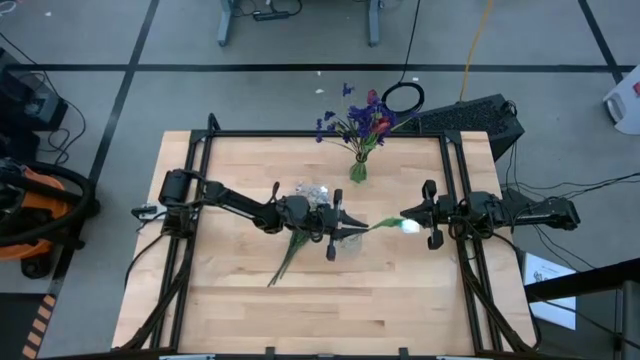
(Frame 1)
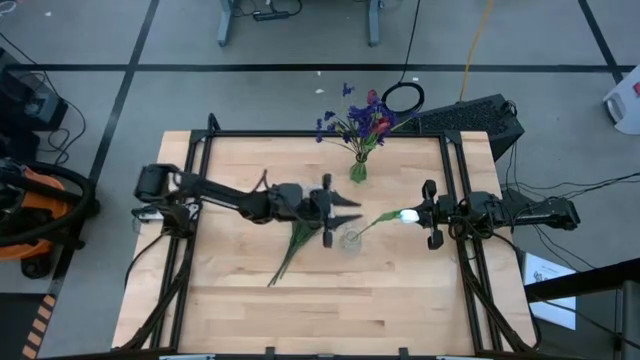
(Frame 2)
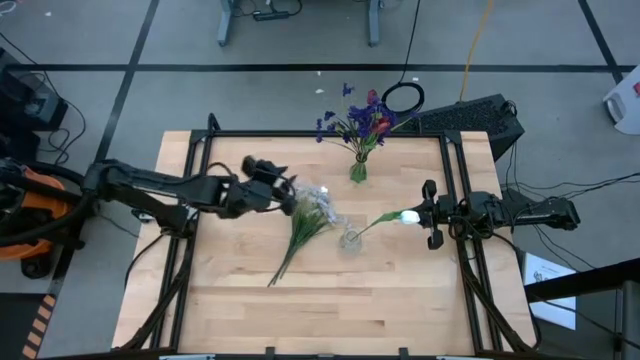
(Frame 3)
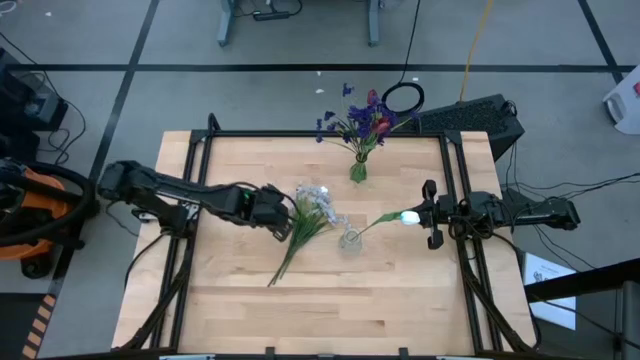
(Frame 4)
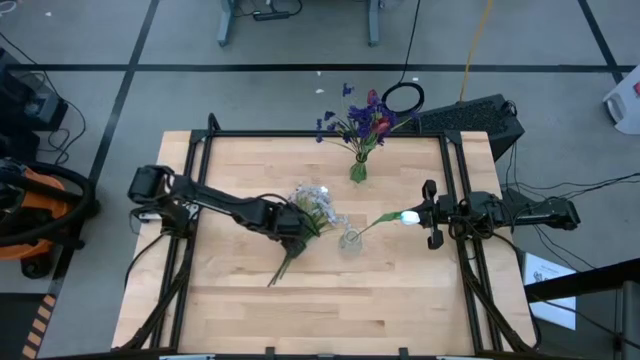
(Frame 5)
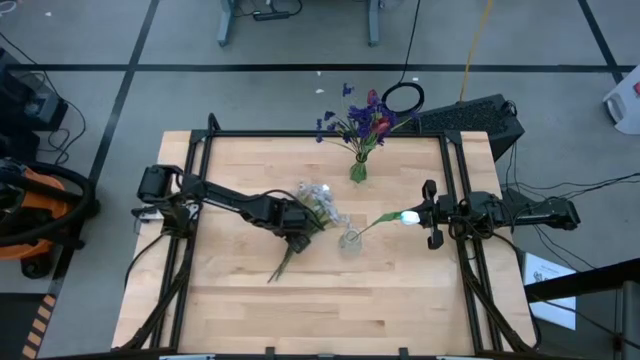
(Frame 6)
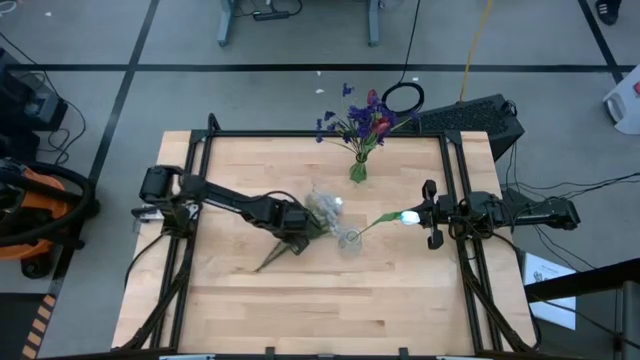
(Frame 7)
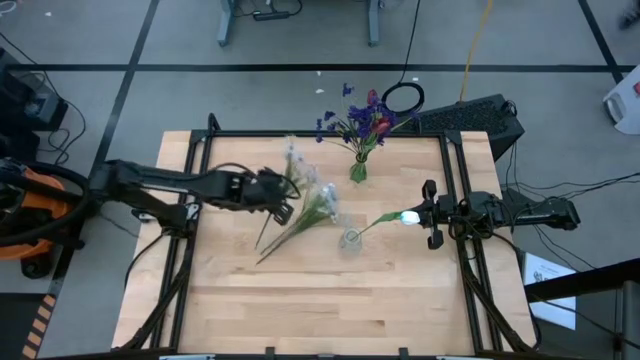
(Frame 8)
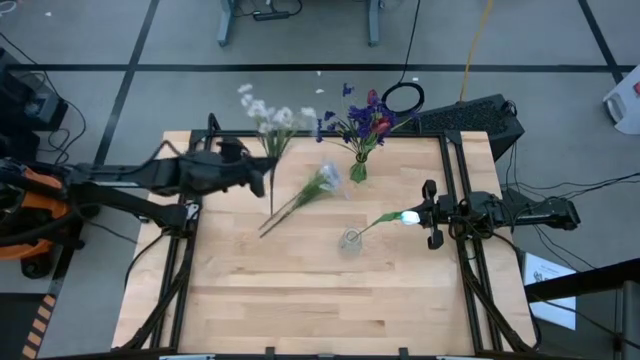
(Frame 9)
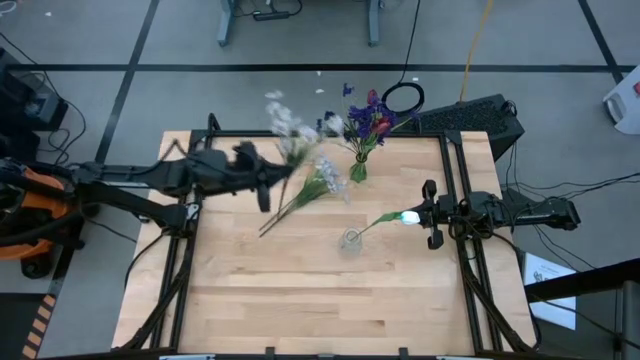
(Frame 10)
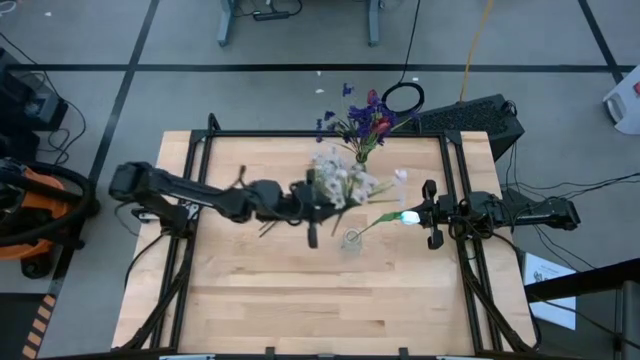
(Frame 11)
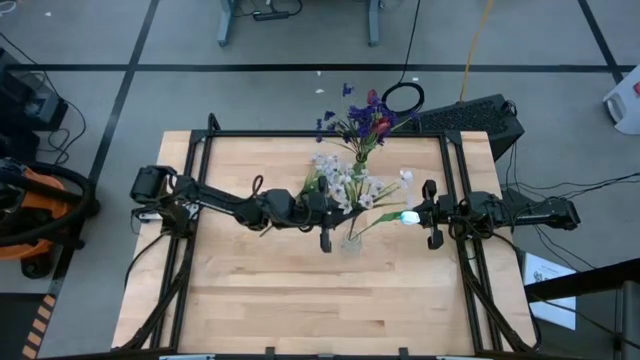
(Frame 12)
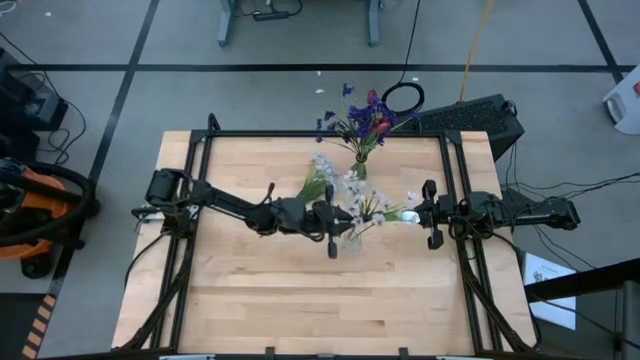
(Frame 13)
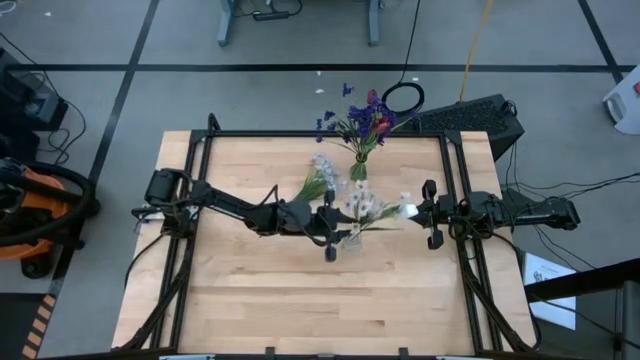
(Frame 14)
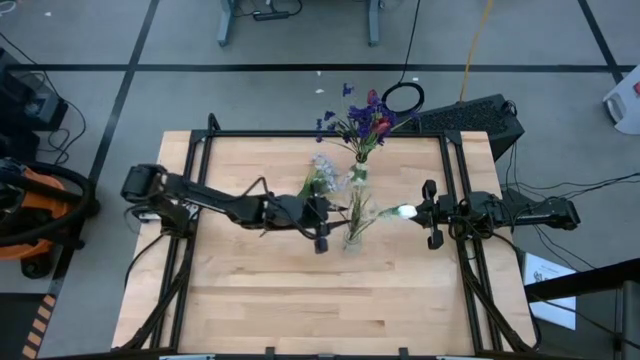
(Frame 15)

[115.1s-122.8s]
Task: Sort flowers into vase by color
Put the left white flowers into the transparent flower vase

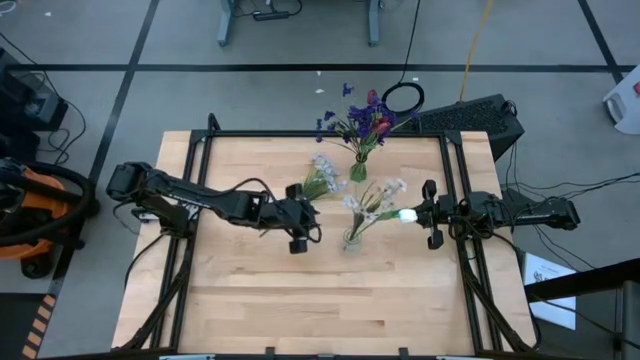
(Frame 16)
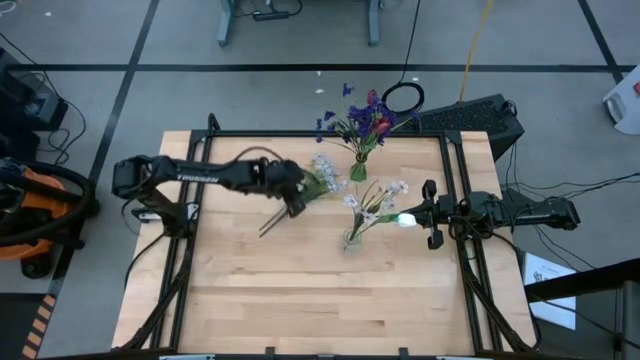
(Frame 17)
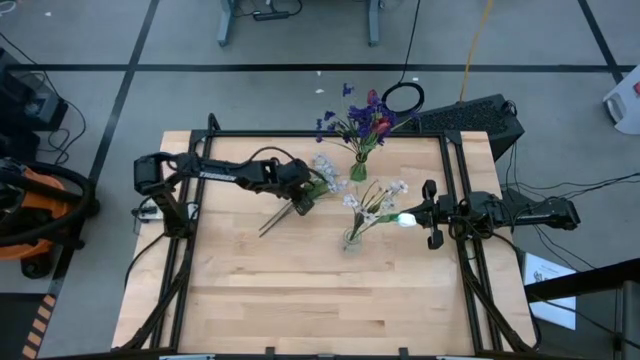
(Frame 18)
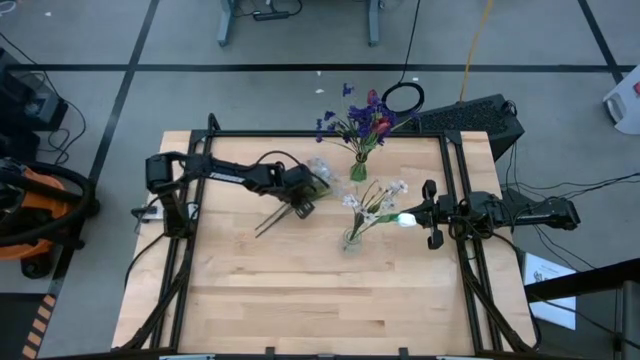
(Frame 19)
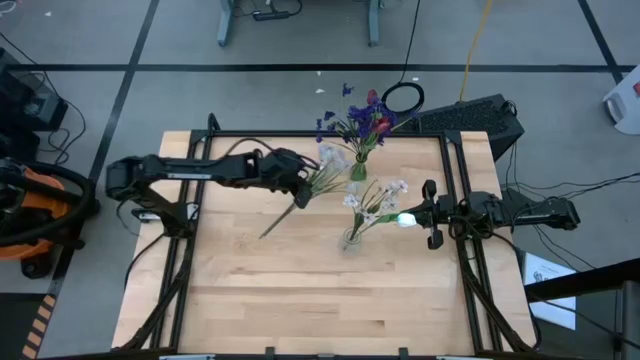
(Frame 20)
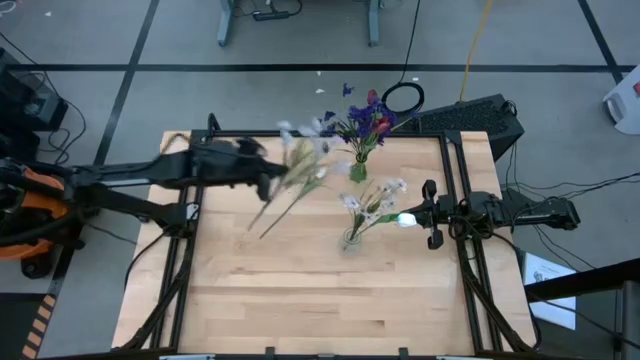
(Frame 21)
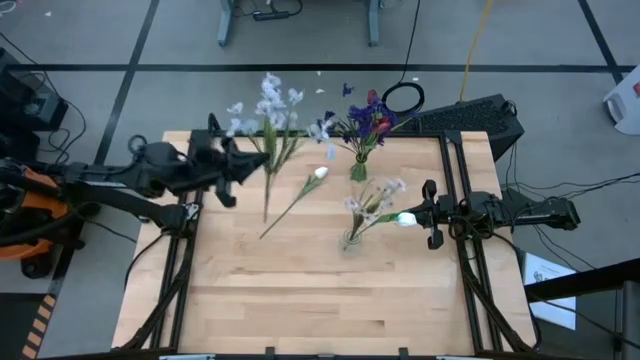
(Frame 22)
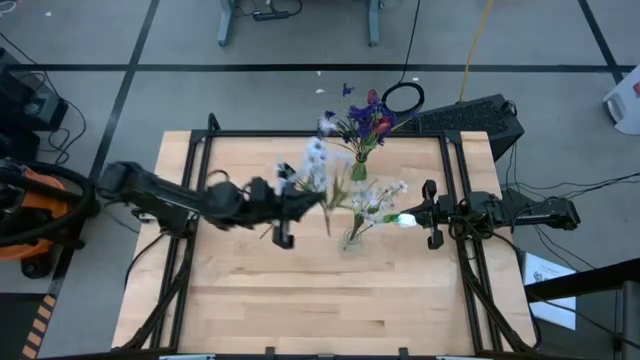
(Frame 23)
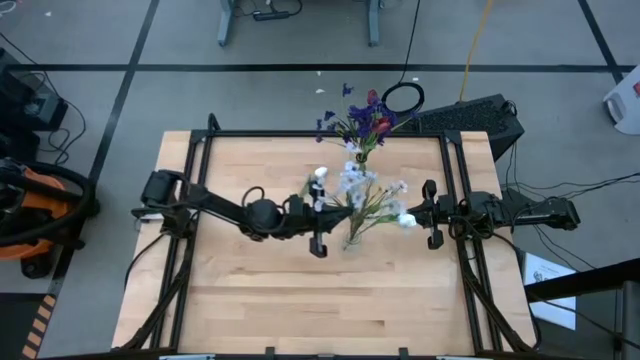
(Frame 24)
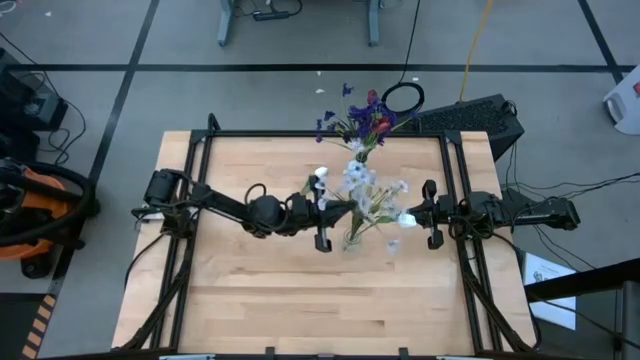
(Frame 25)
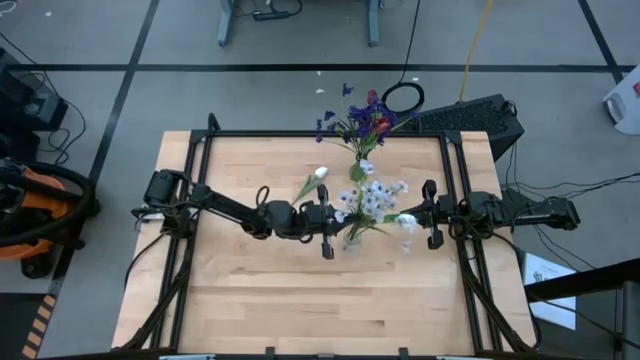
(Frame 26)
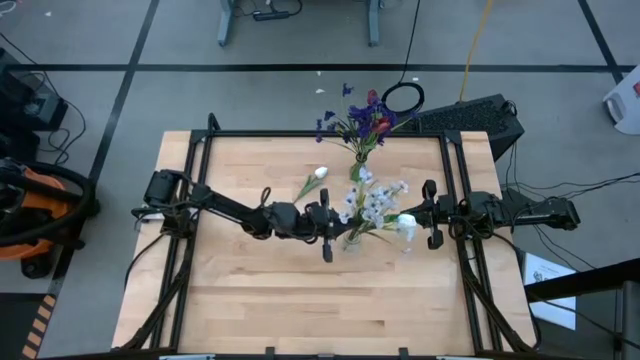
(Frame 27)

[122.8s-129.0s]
Put the white flowers into the transparent flower vase

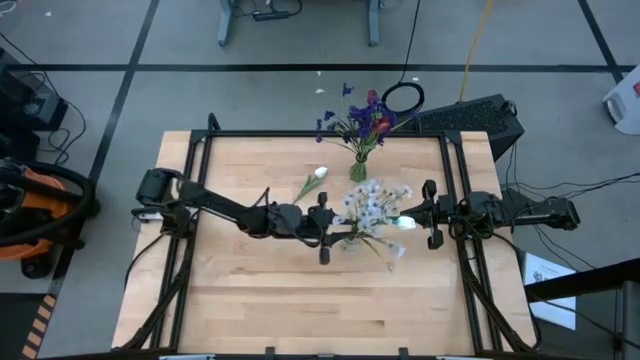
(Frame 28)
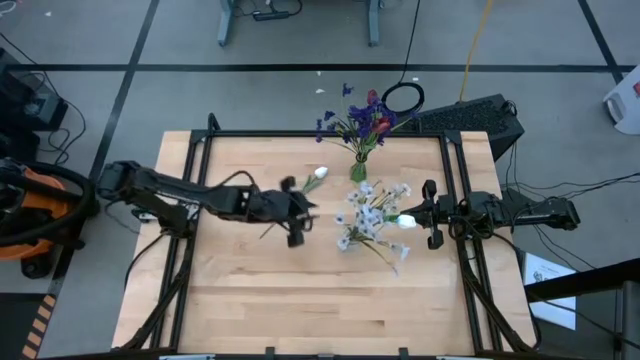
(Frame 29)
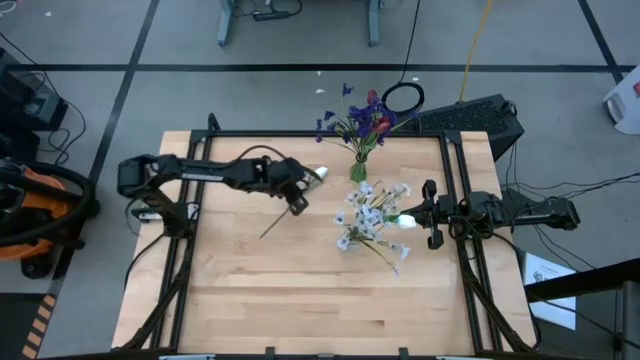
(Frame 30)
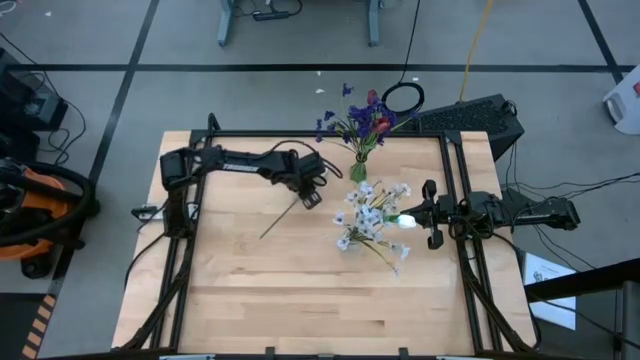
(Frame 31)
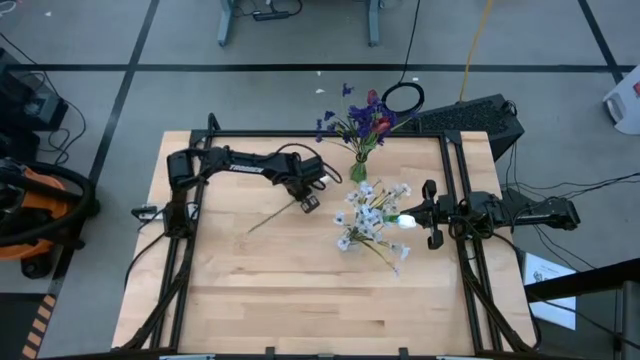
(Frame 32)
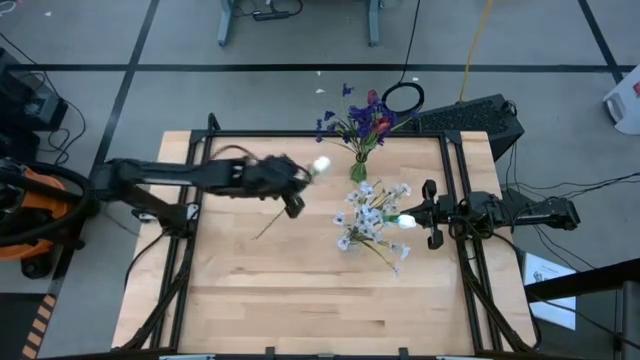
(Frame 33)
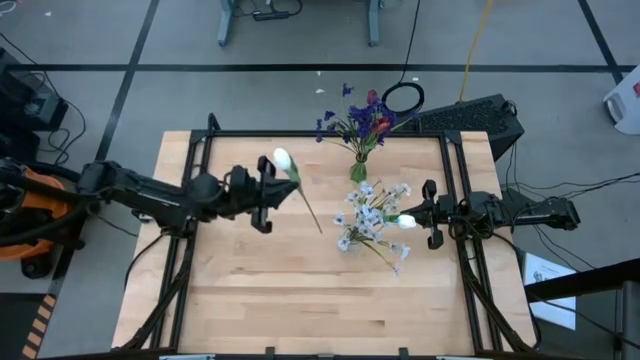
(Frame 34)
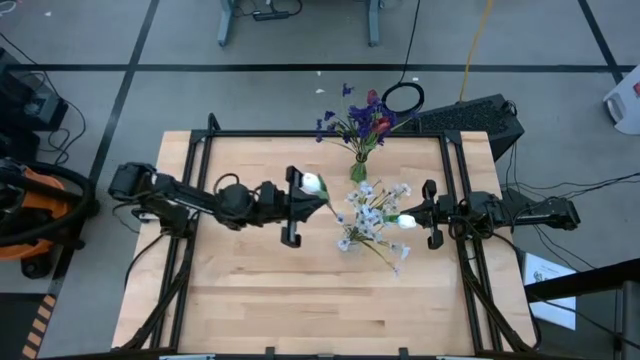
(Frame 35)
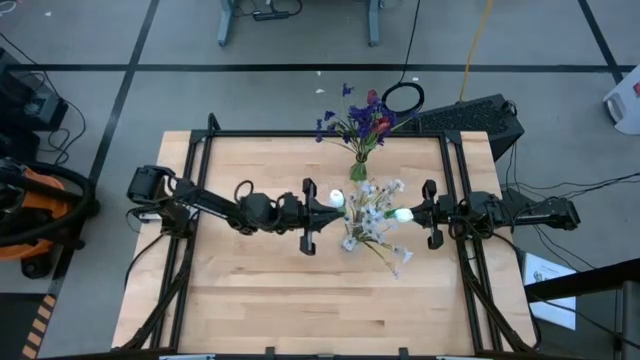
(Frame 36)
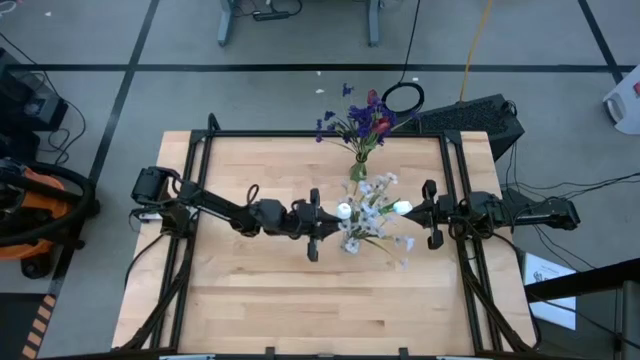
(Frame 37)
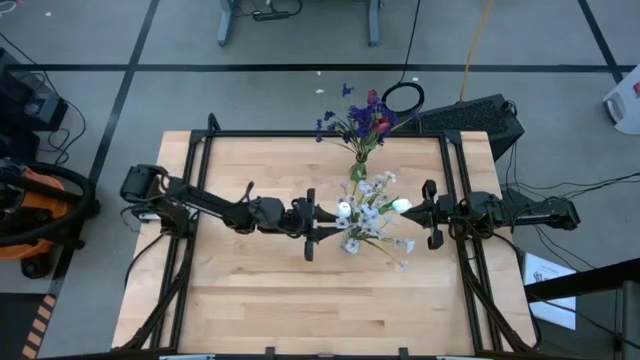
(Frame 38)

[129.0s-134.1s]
Put the white tulip into the transparent flower vase

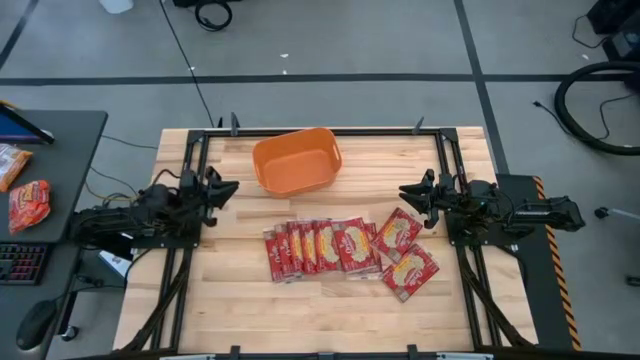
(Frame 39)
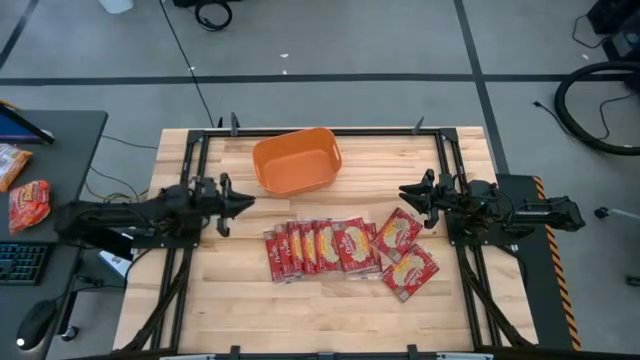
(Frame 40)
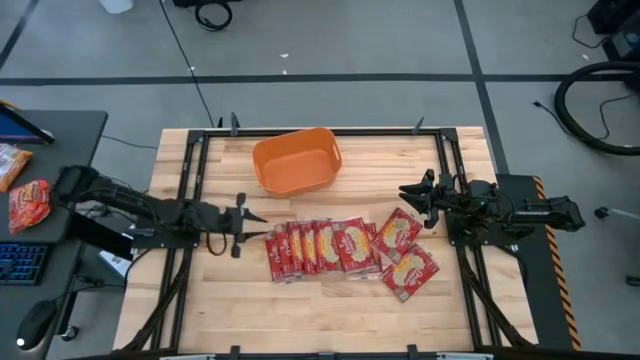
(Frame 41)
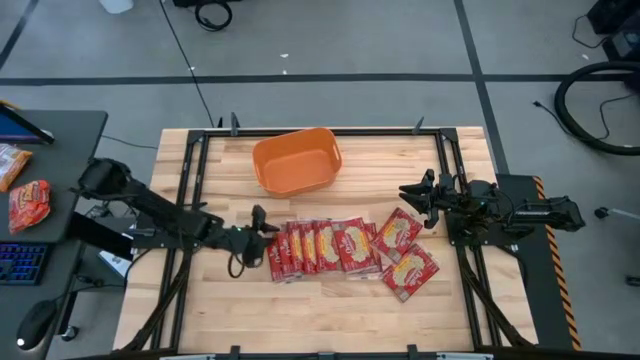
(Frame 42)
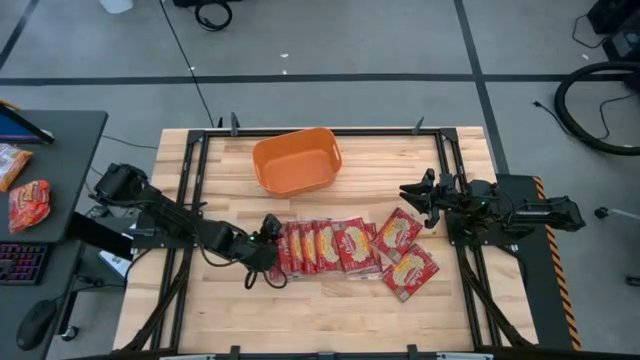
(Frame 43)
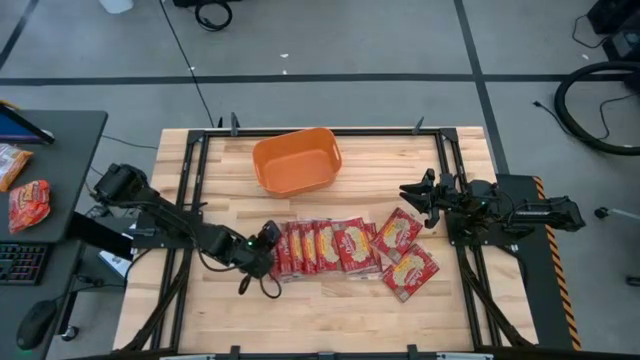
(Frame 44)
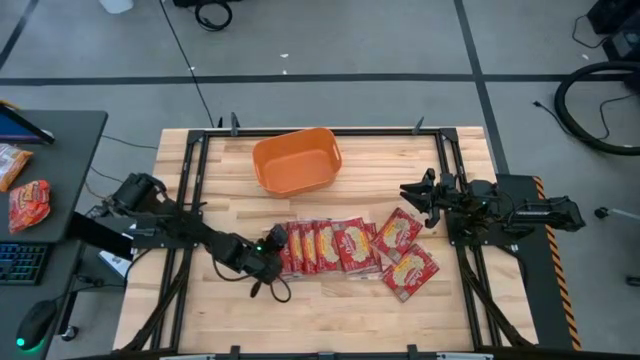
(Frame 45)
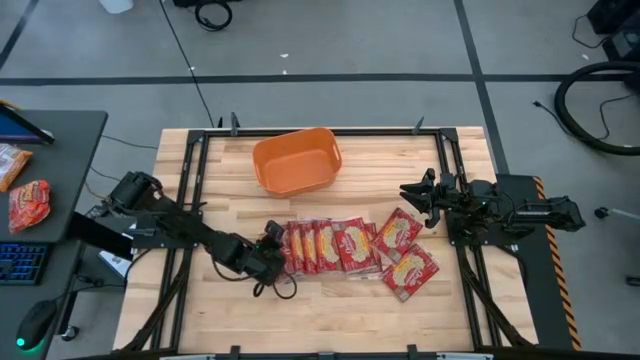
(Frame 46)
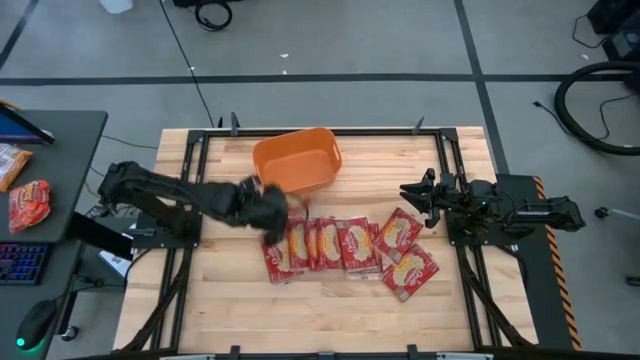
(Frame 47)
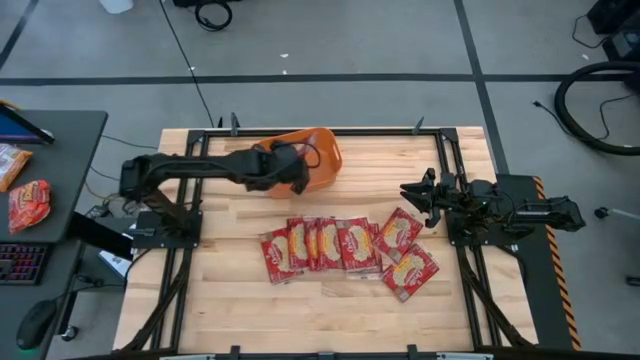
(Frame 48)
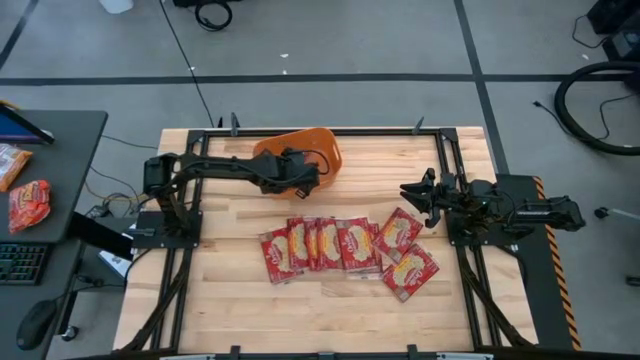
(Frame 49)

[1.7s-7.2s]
Task: Sort popcorn bags into baskets
Put the red popcorn bag into the orange bin
